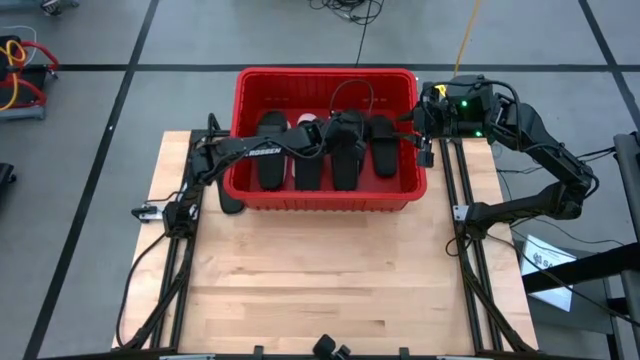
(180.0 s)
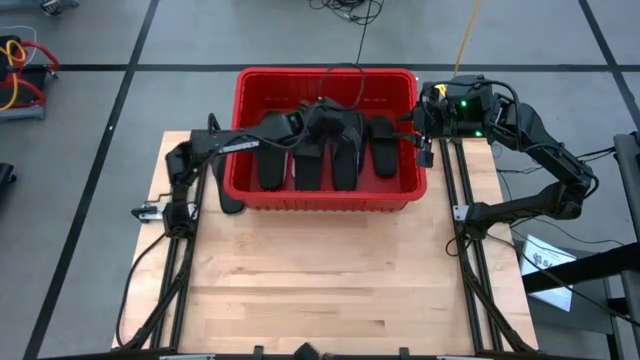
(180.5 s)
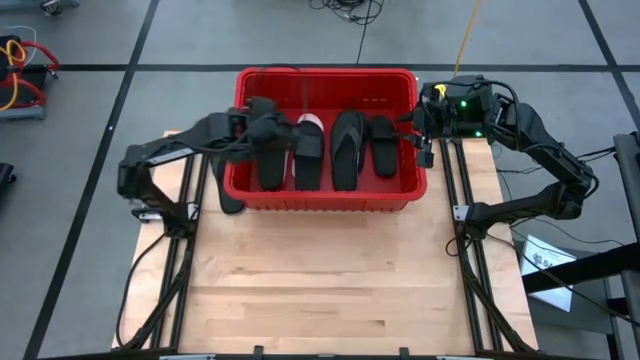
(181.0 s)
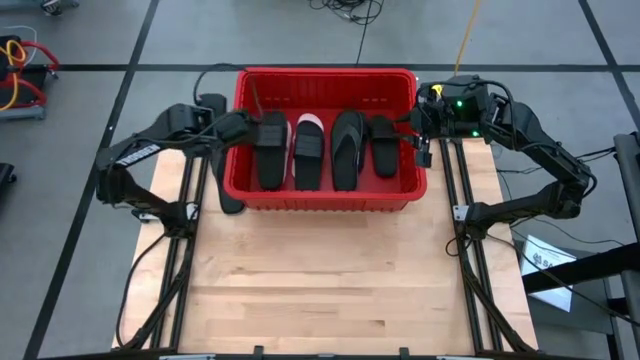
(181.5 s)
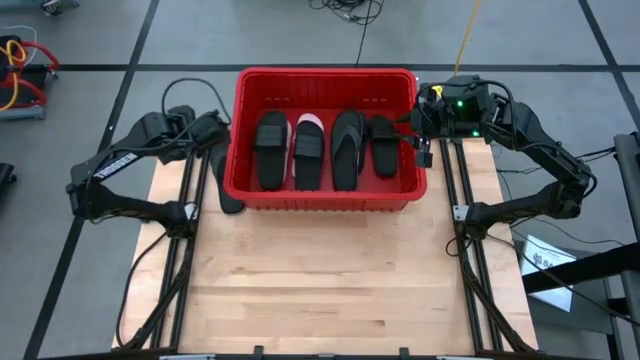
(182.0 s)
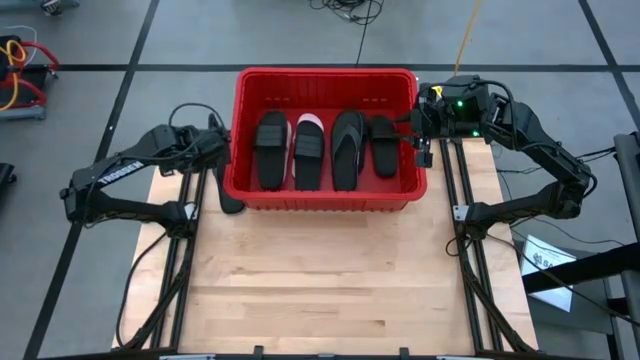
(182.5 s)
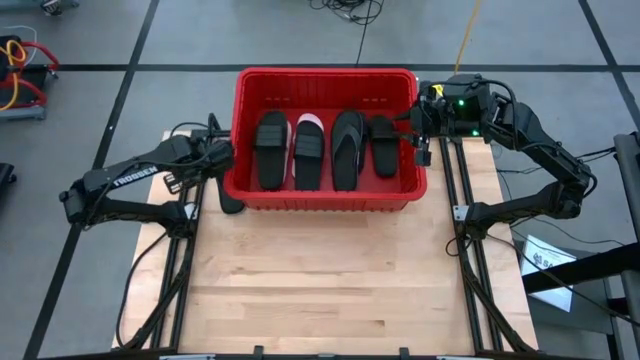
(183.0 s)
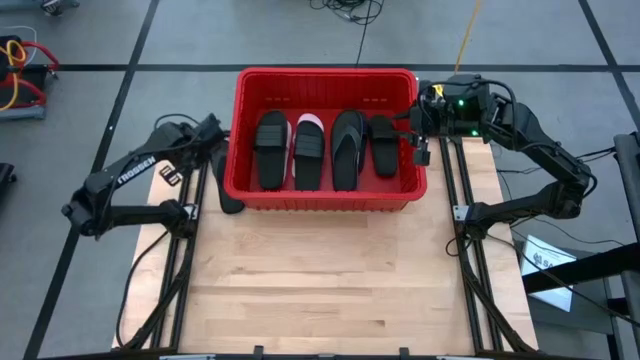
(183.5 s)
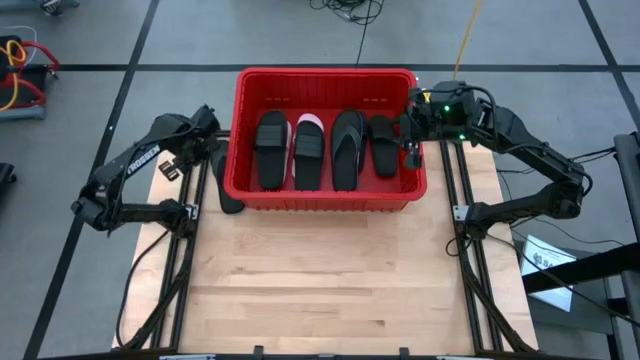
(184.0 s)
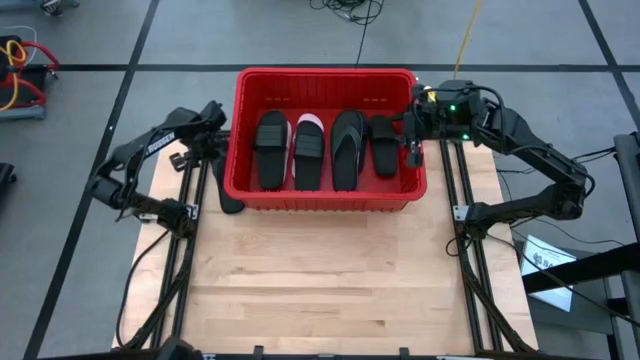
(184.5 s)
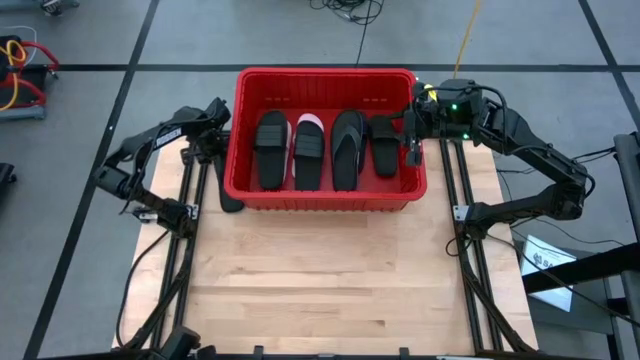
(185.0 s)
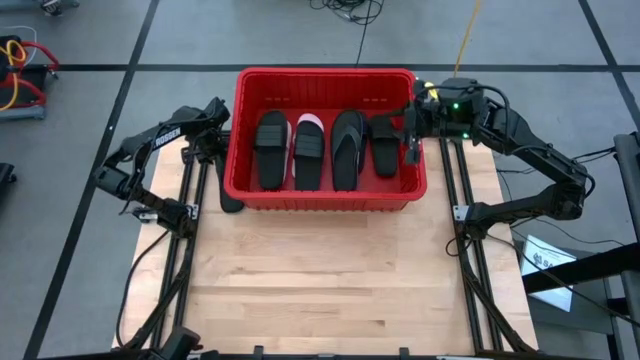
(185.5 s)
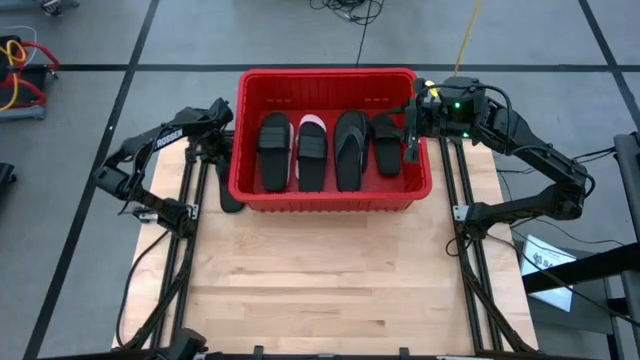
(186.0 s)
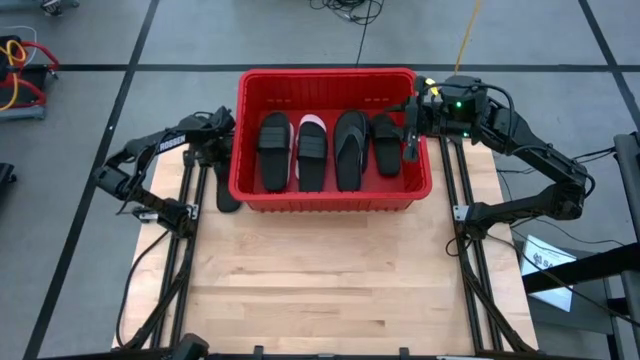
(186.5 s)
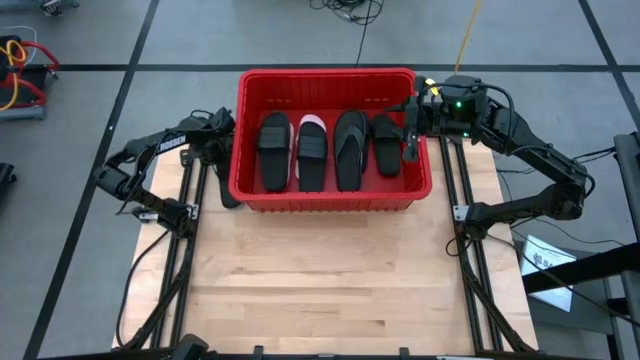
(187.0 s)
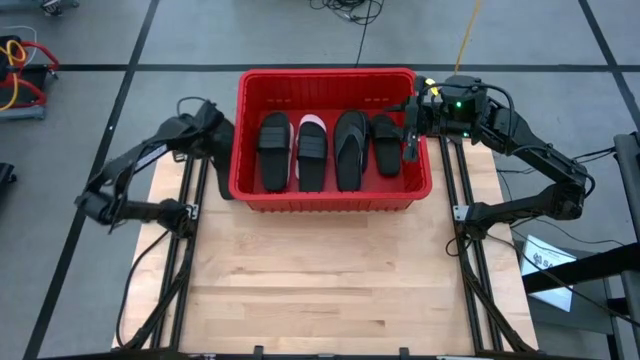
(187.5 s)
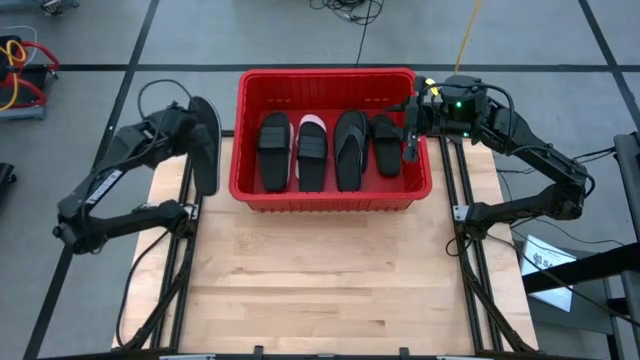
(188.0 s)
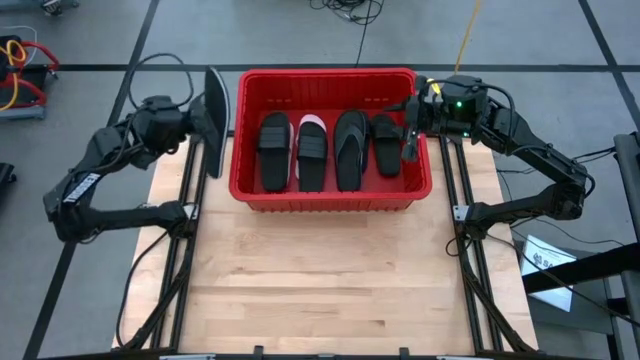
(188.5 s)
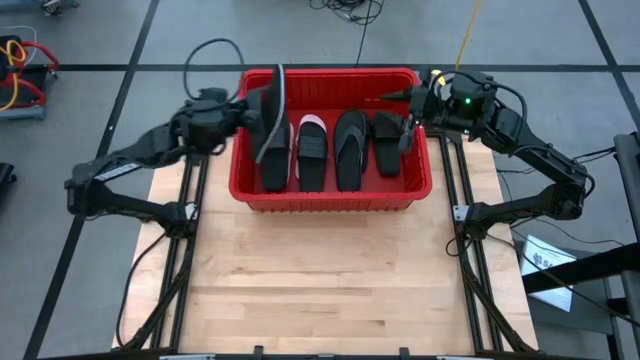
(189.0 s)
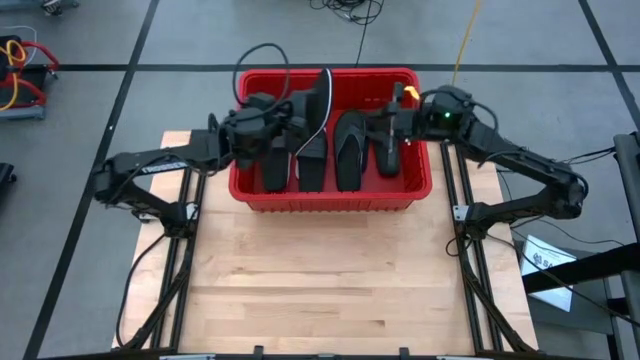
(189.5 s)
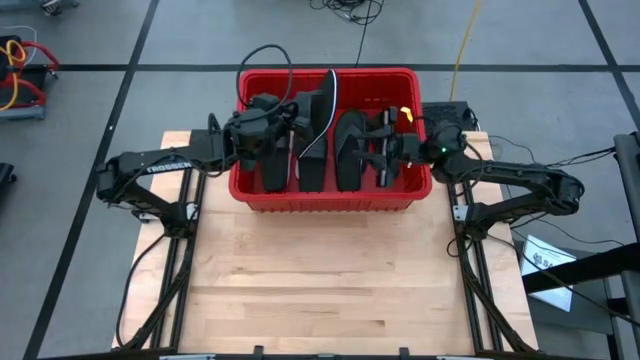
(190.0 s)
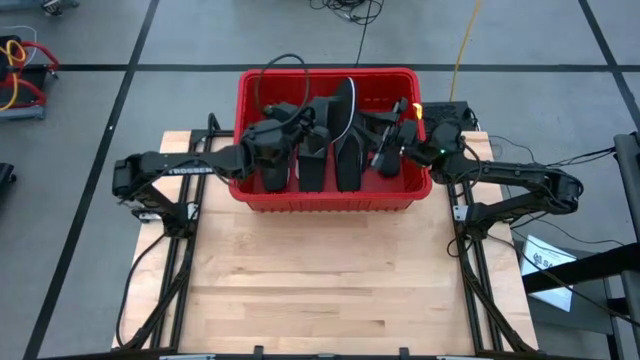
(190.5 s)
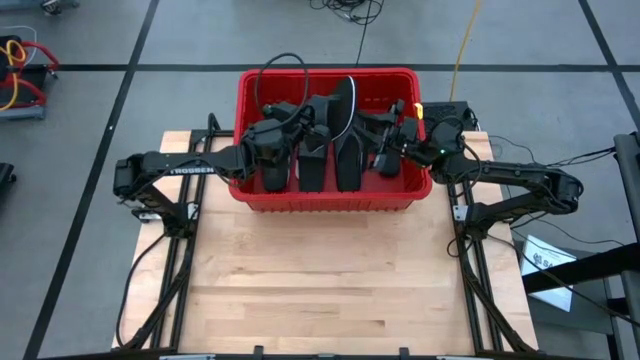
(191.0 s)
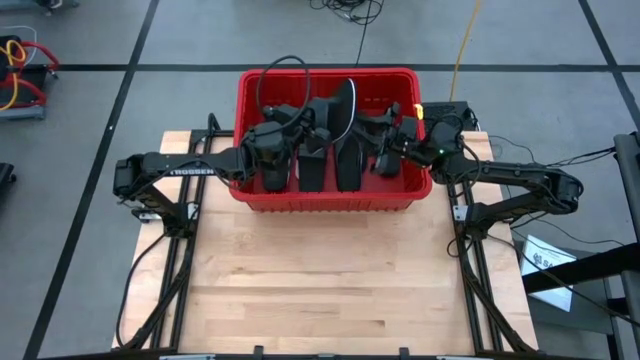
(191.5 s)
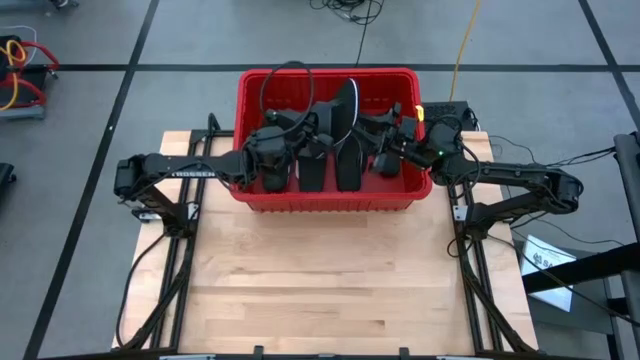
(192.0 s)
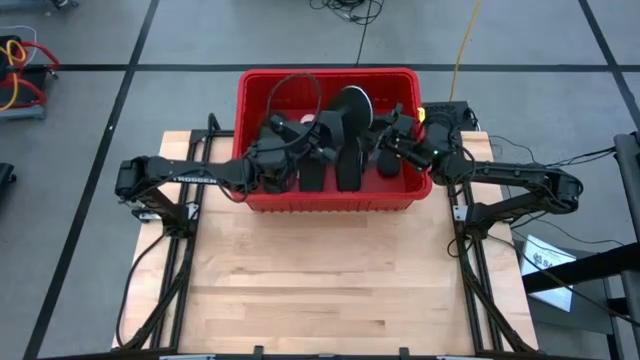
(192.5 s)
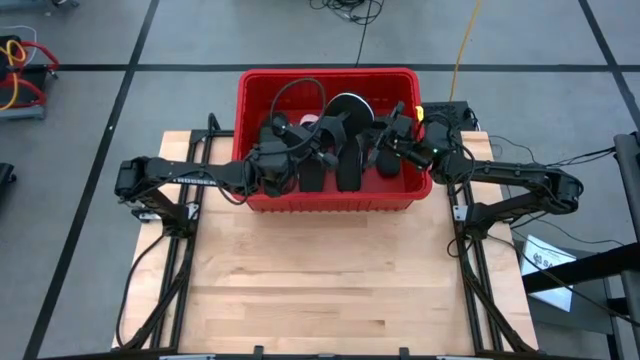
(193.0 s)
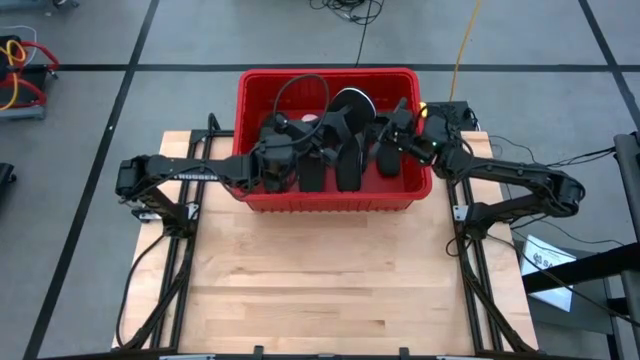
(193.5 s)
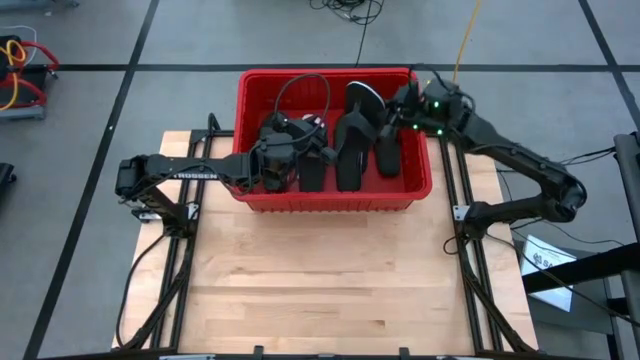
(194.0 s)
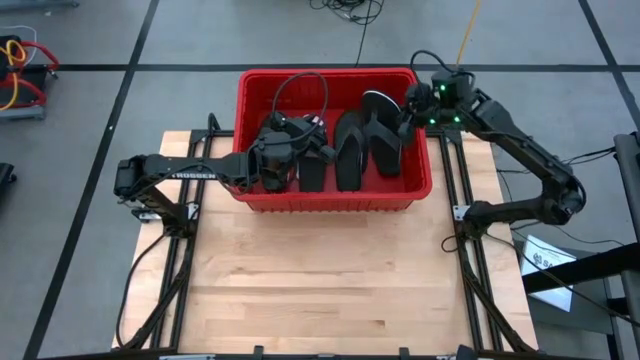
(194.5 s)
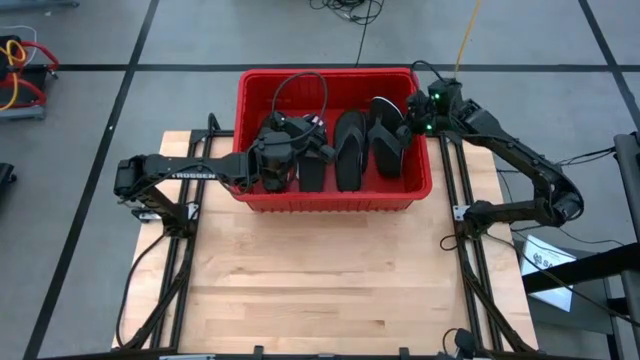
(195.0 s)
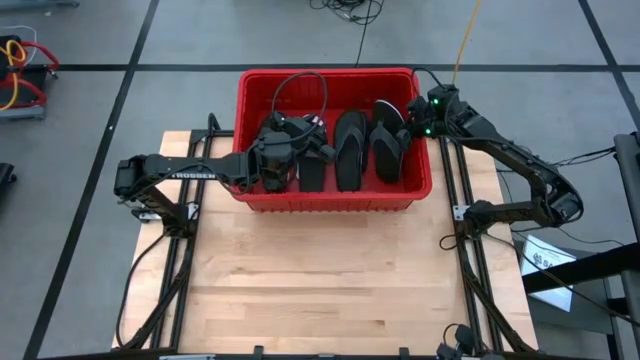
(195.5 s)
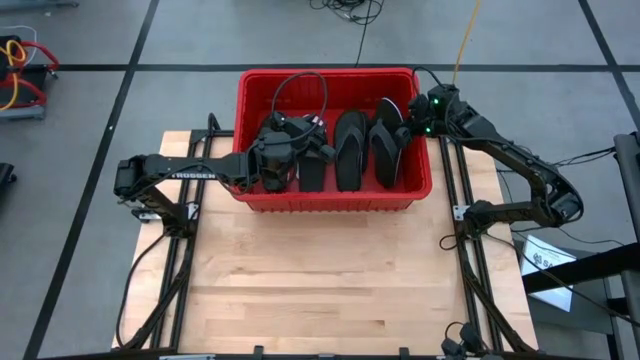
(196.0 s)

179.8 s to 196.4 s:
Task: Pick and place slides into bin
Put the black flip flop on the slide in the red bin

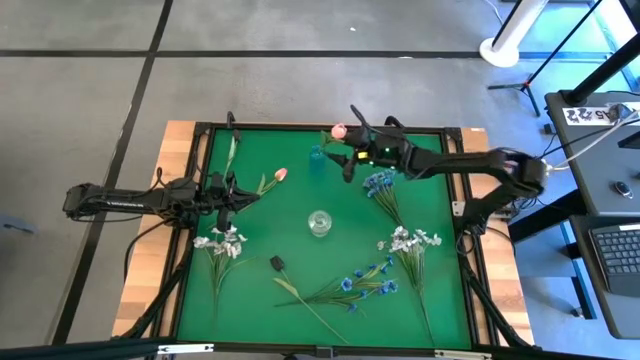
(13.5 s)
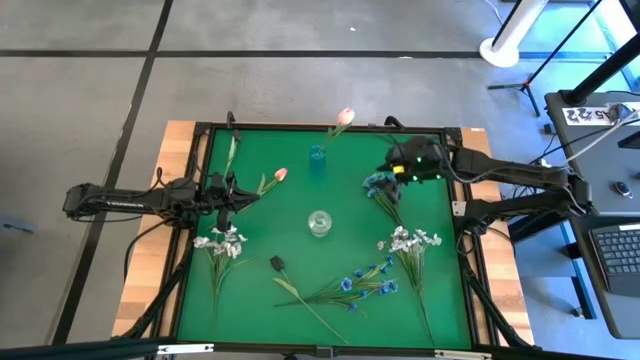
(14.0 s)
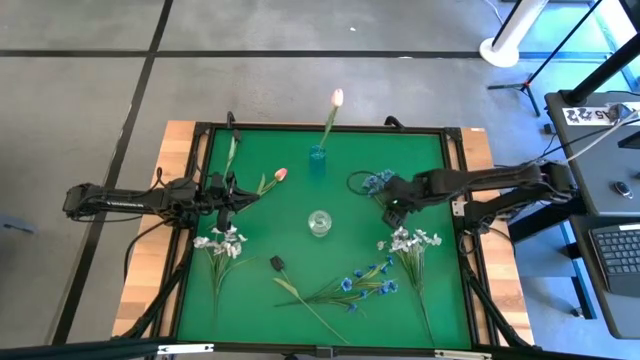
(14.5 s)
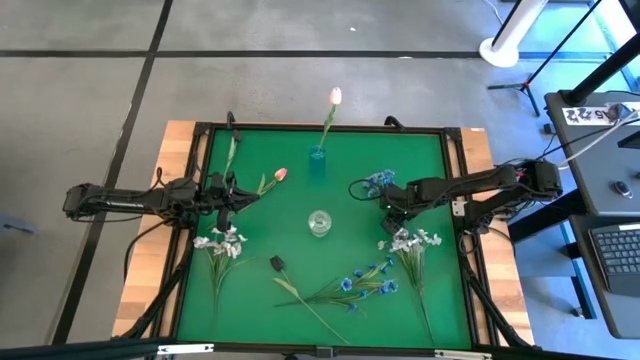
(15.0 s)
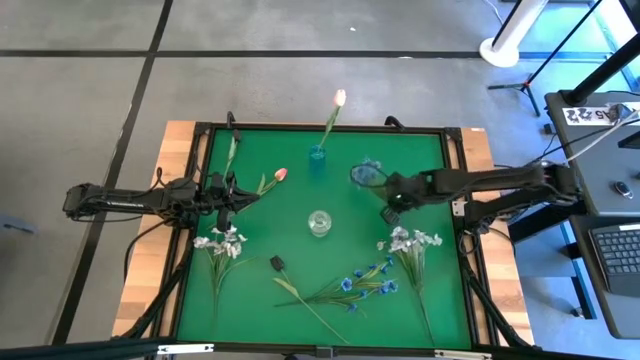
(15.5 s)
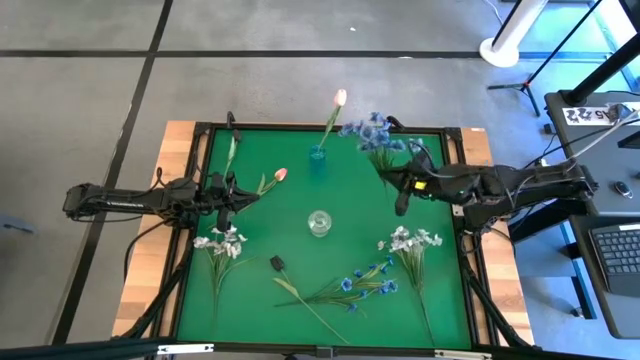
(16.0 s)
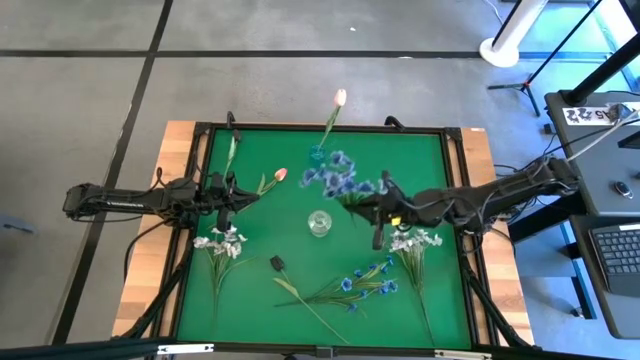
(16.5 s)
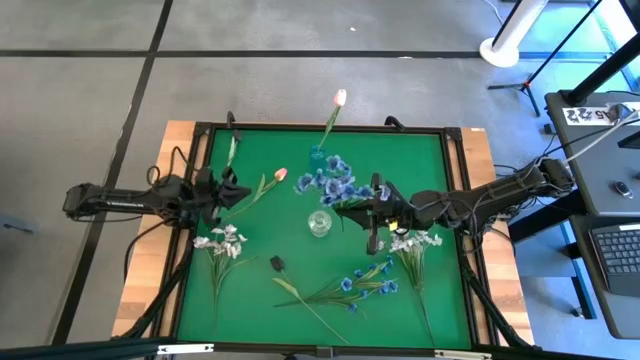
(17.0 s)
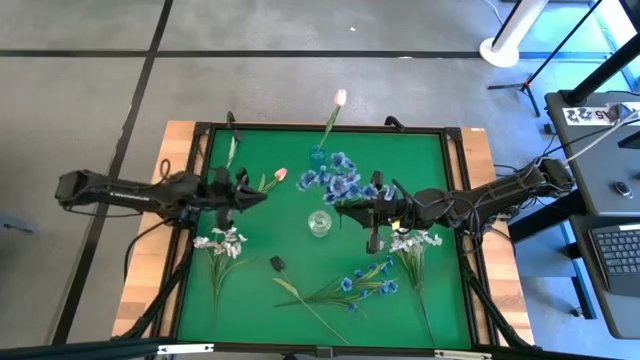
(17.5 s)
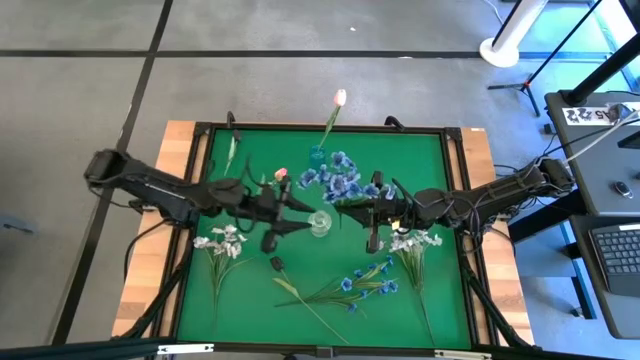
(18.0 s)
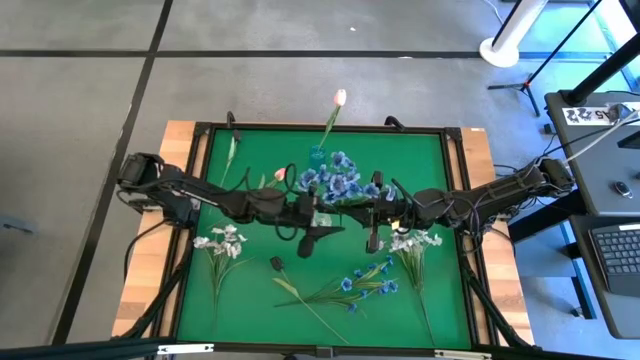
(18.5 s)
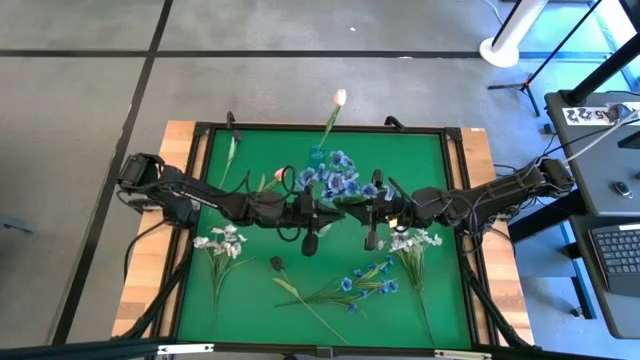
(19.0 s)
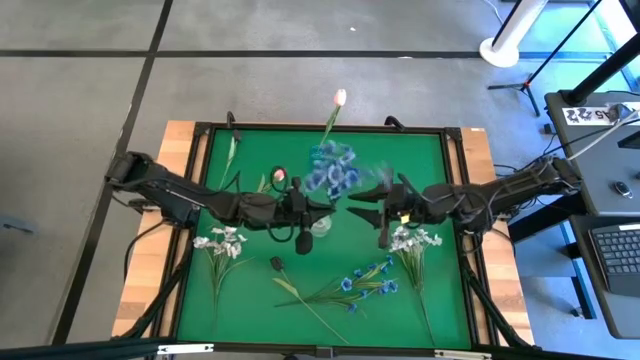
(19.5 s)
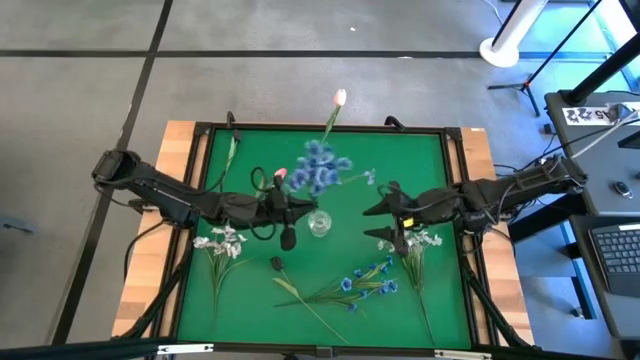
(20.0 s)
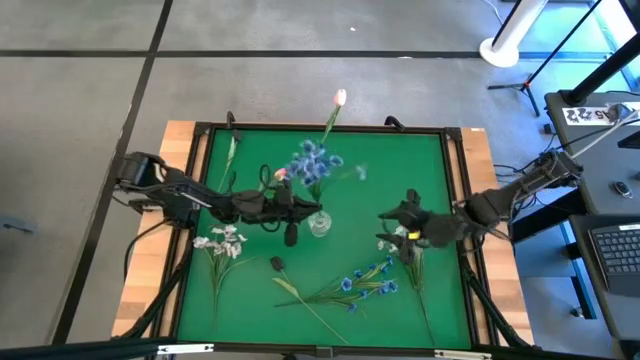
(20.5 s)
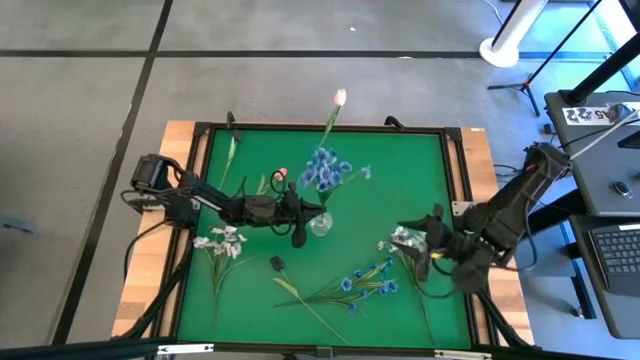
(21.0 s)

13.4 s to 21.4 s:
Task: Sort flowers into vase by color
Put the top blue flowers into the transparent vase
